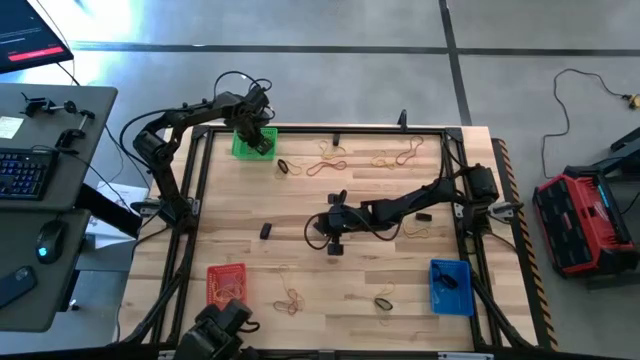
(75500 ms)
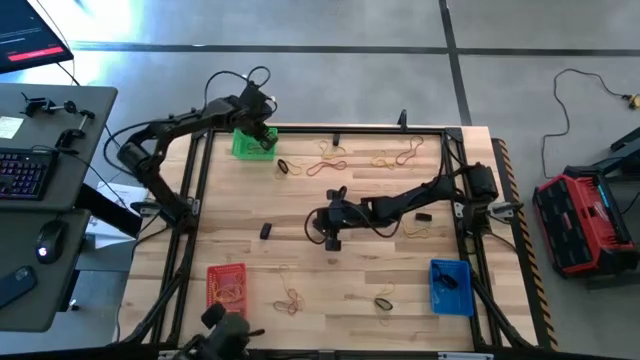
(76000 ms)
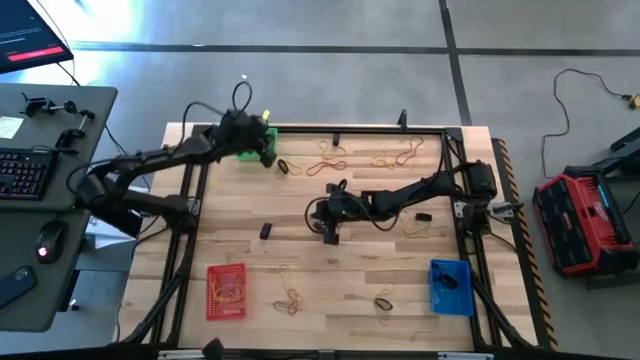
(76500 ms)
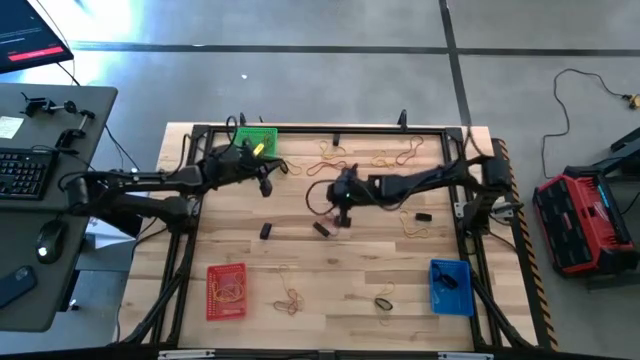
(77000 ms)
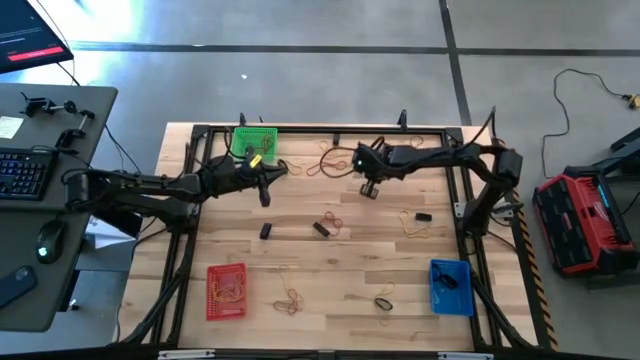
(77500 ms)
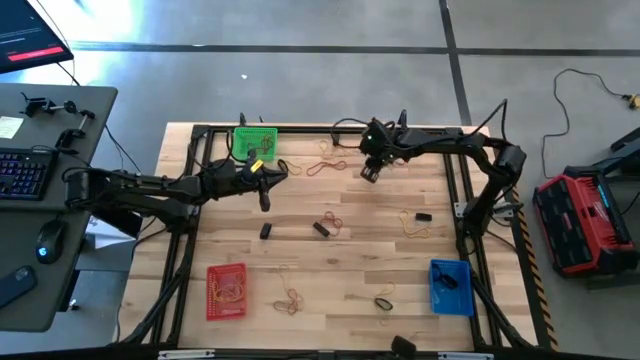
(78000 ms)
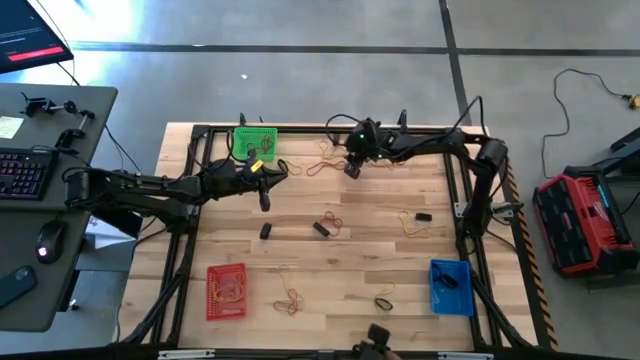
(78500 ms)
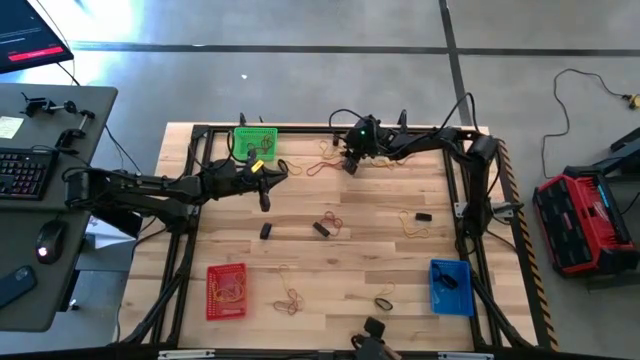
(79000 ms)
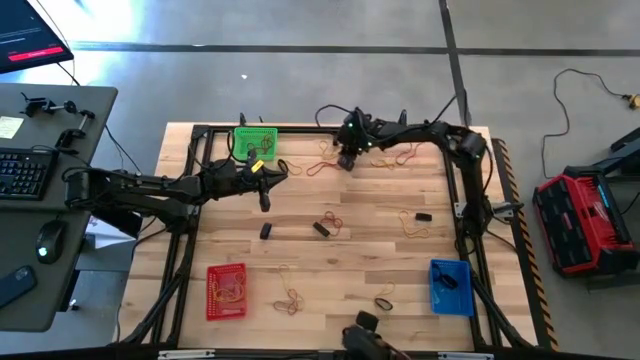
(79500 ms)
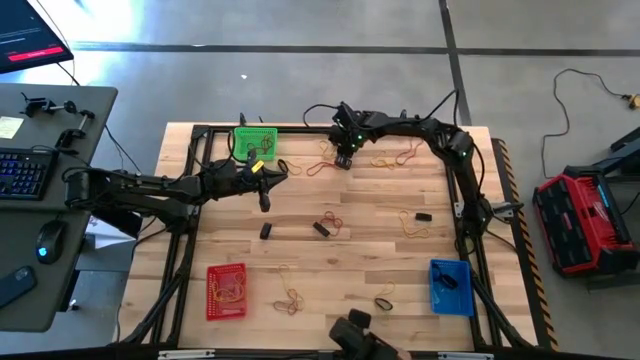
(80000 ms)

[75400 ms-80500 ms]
Task: Sort rubber bands into baskets
Put the yellow rubber band into the red bin

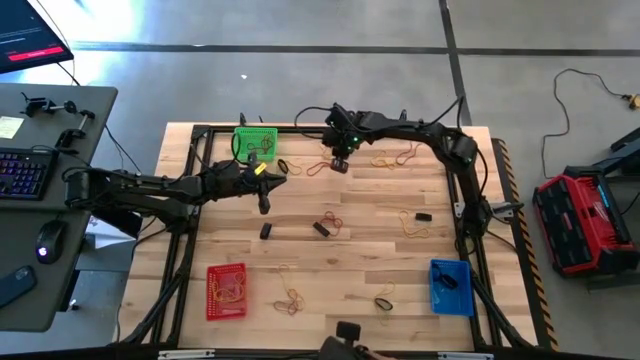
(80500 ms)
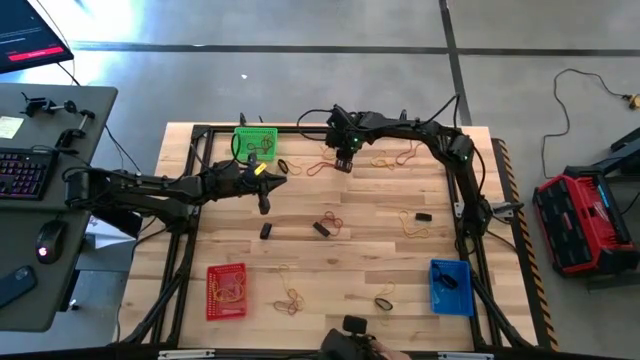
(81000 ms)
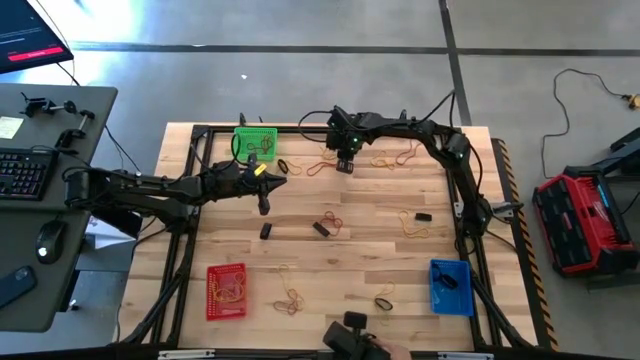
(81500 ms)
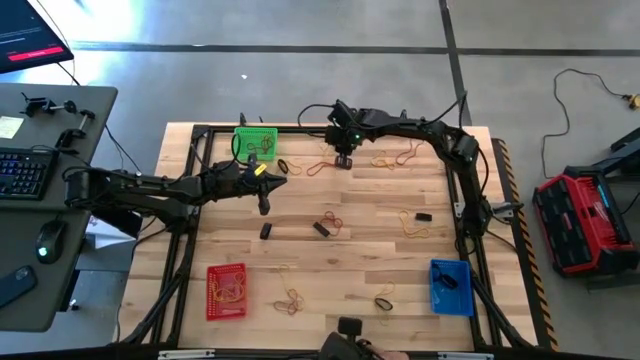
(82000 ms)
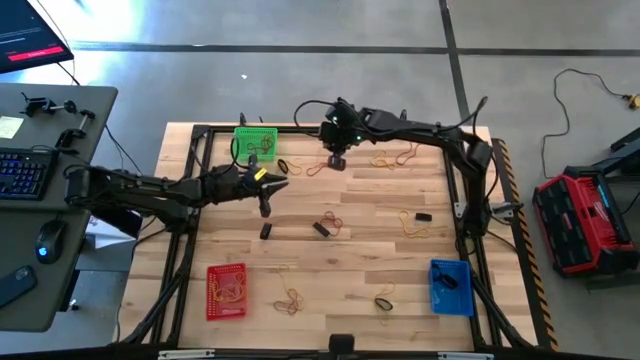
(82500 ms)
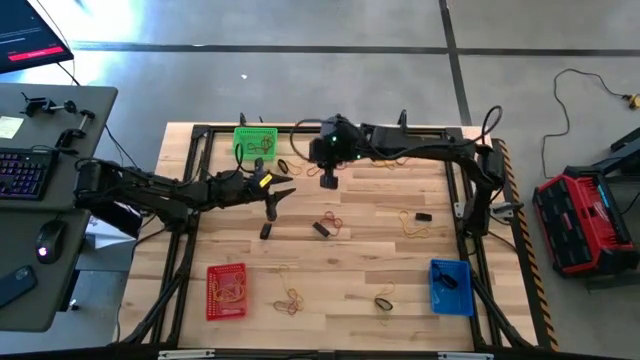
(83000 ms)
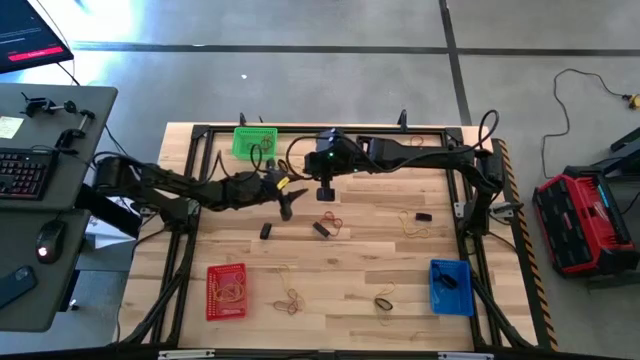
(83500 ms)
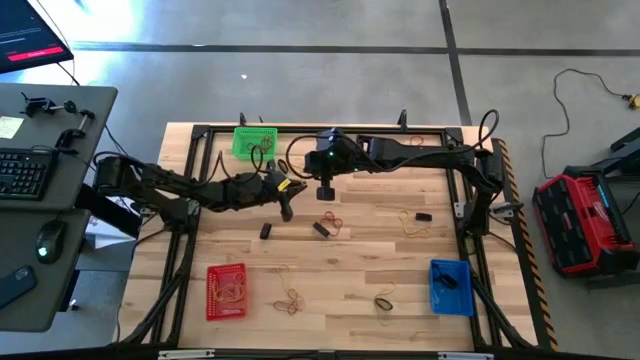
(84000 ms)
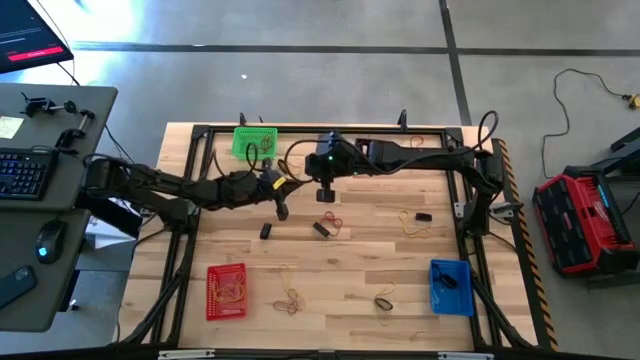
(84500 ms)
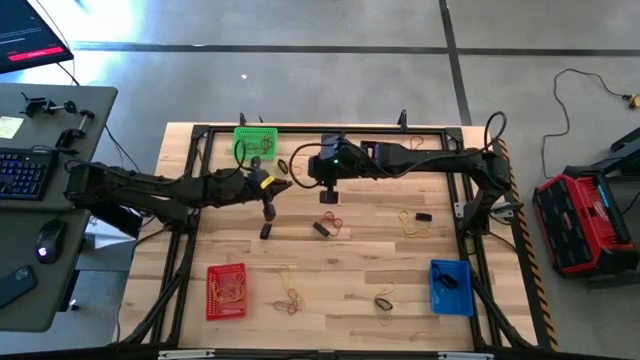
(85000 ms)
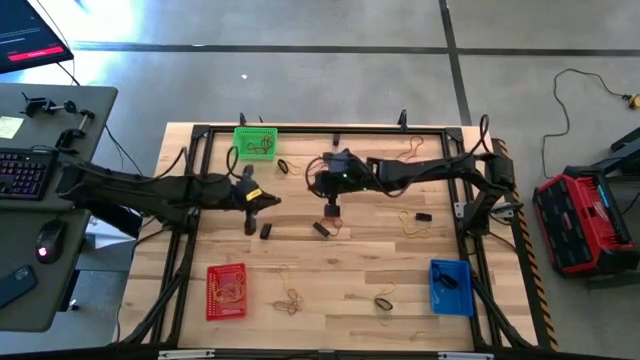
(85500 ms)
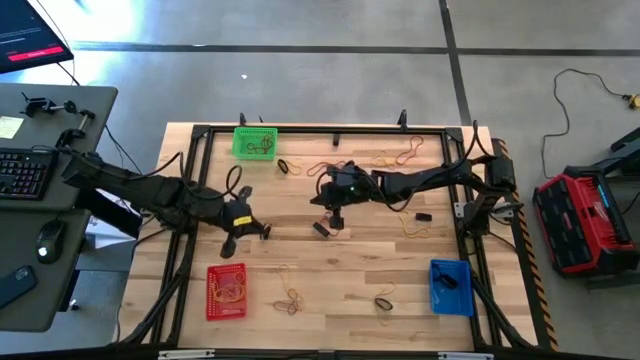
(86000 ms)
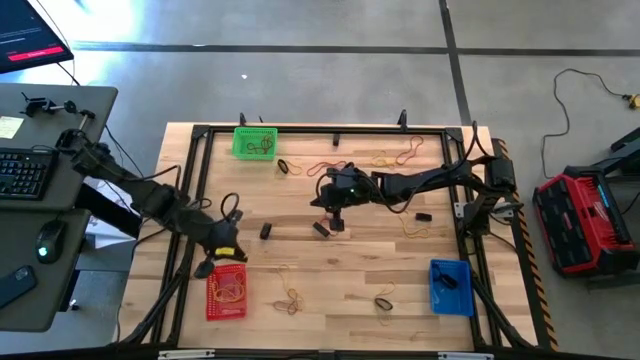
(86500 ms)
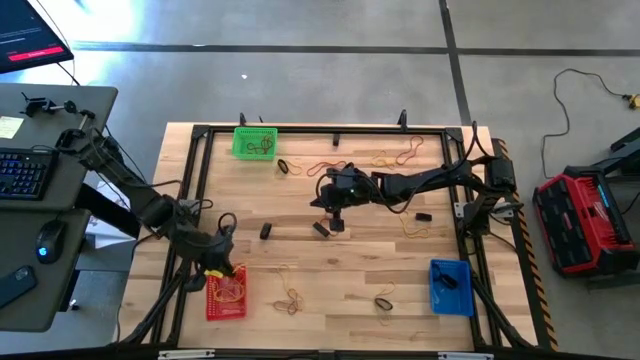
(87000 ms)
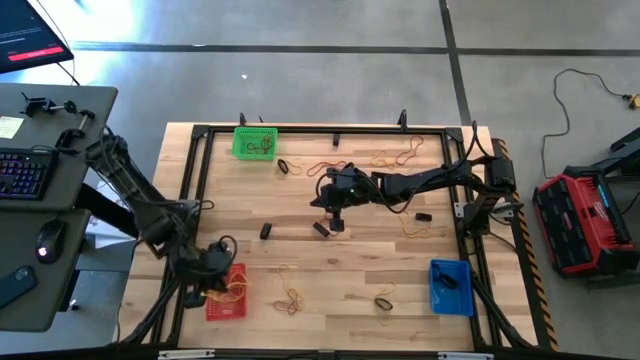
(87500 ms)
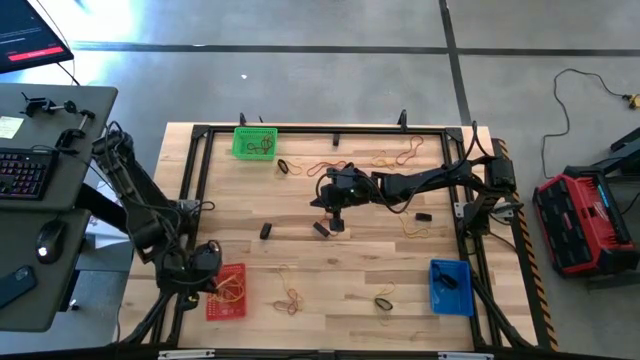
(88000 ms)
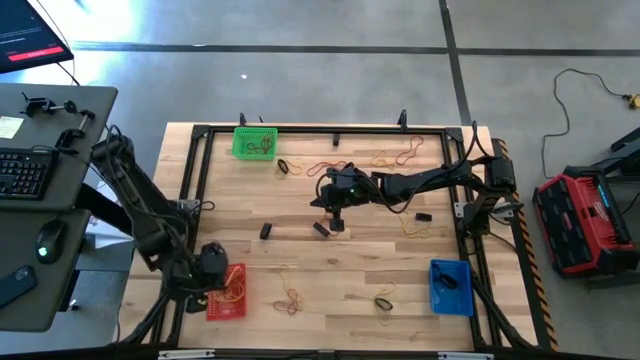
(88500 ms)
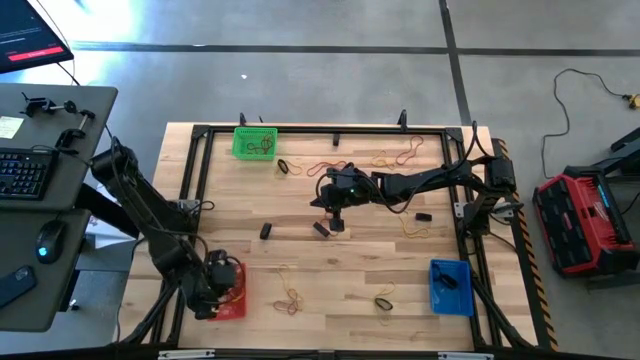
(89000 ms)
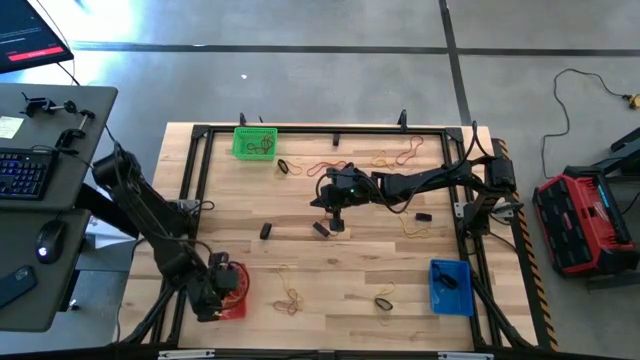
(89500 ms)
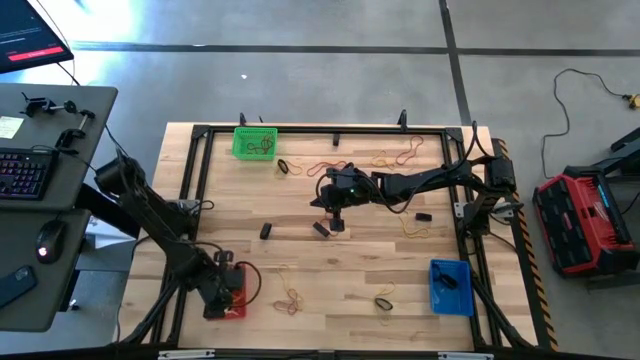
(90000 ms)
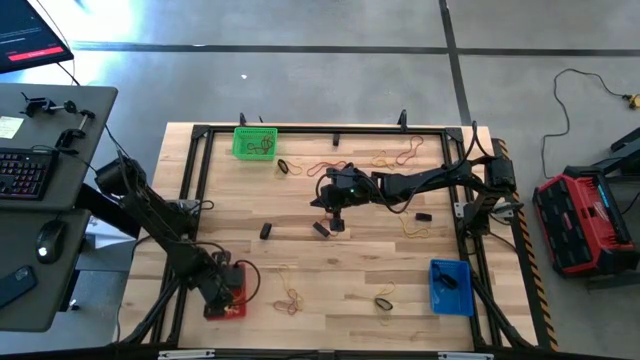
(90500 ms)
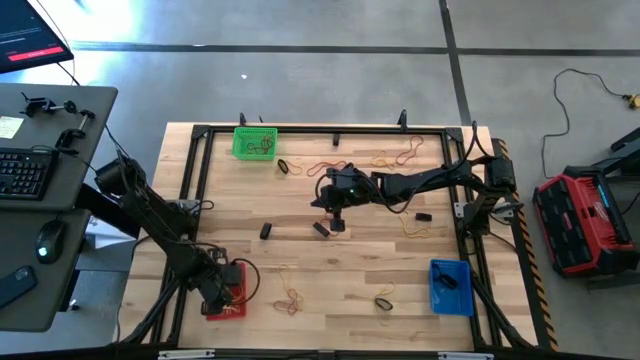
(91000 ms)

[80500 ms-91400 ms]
Put the yellow rubber band into the red bin

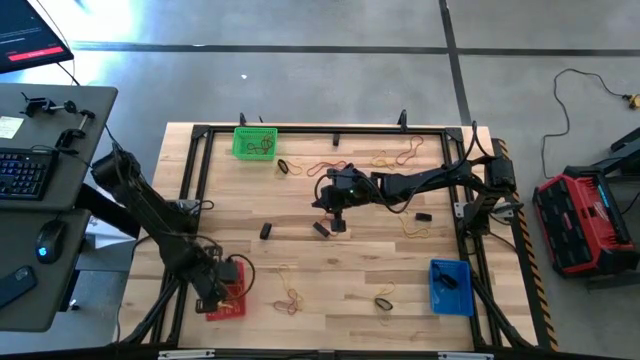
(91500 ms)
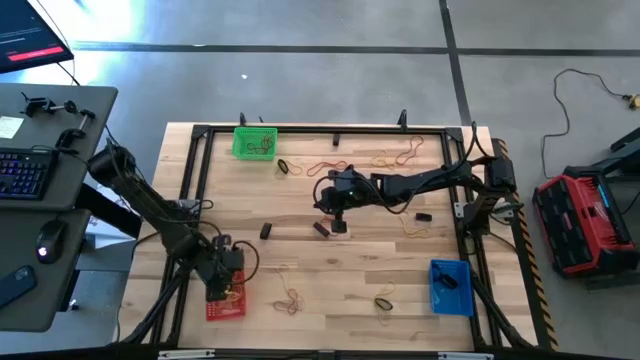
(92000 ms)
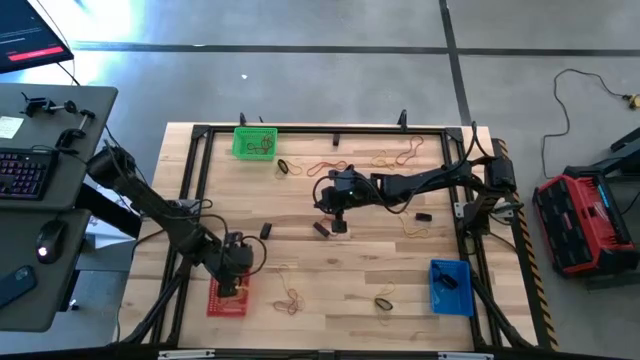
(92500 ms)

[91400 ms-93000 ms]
Adjust the red bin

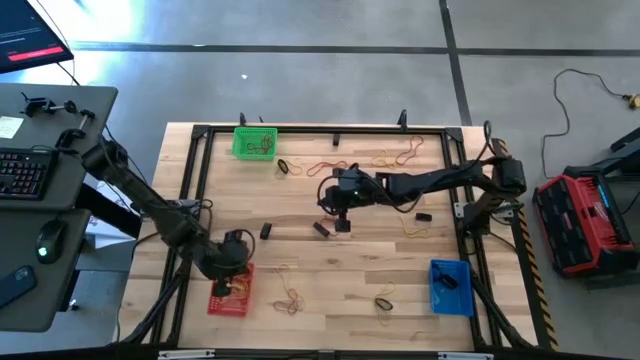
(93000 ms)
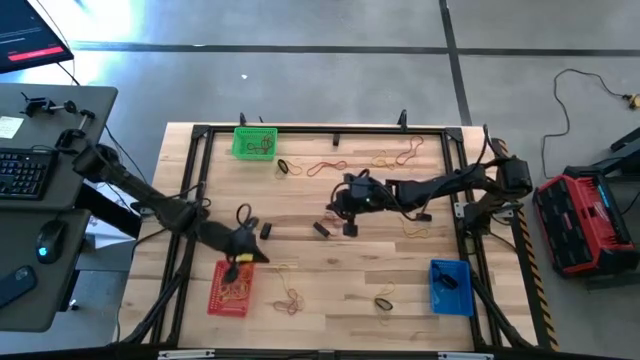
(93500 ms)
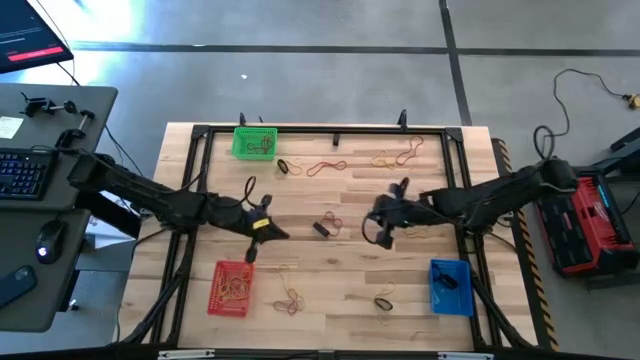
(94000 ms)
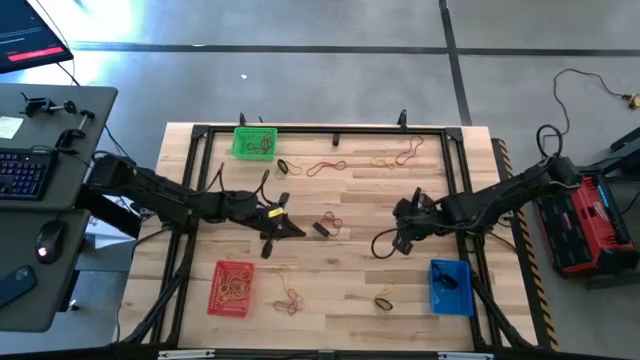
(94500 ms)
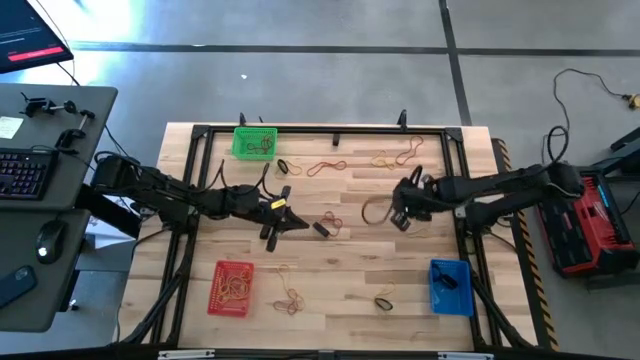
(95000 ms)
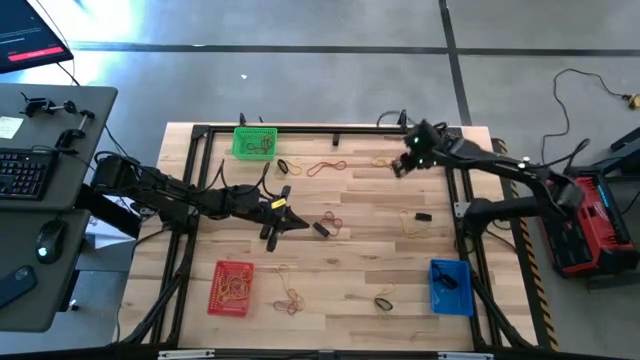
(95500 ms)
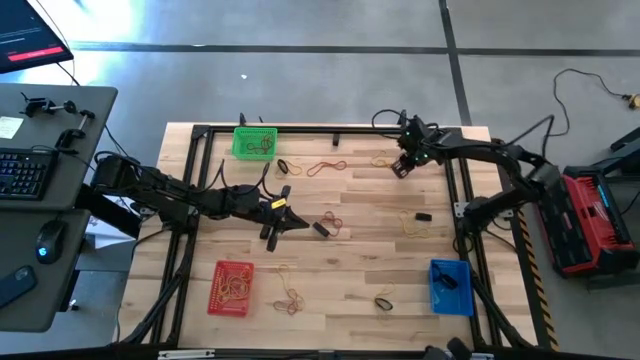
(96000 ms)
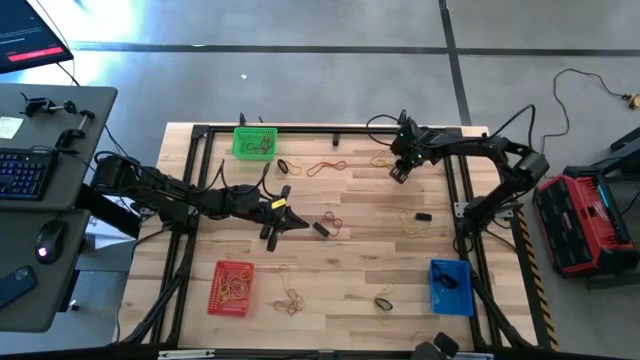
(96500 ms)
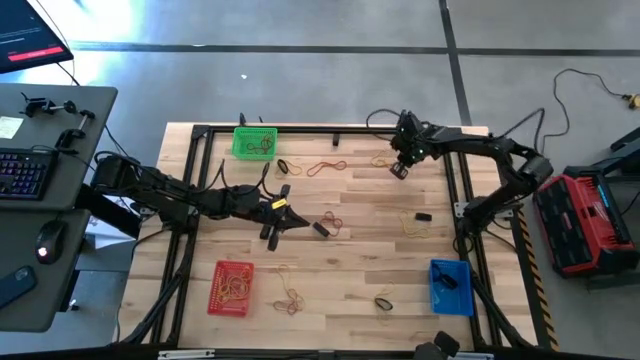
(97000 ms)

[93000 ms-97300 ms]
Put the red rubber band into the green bin
